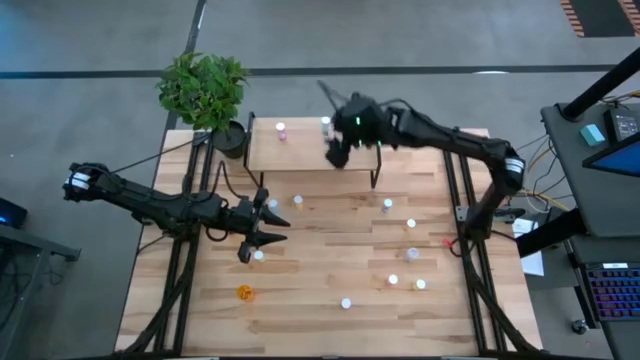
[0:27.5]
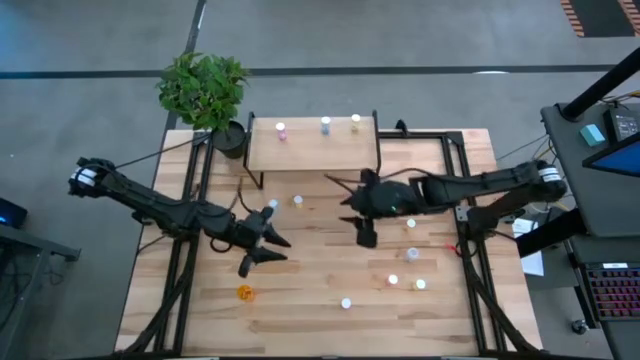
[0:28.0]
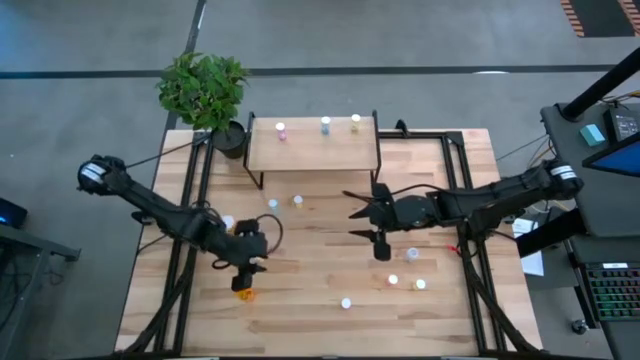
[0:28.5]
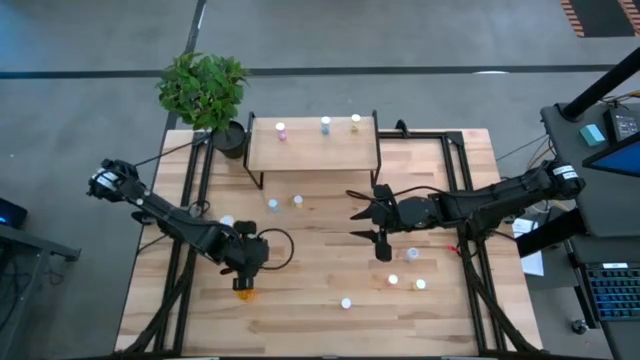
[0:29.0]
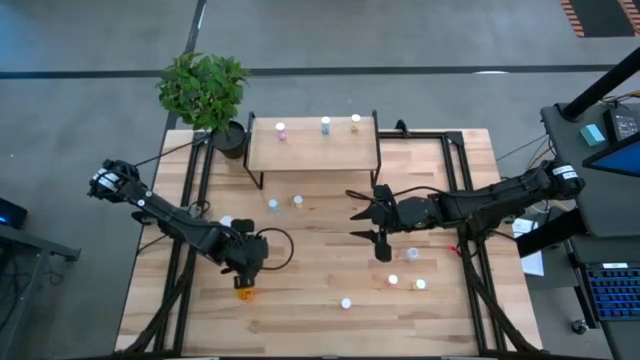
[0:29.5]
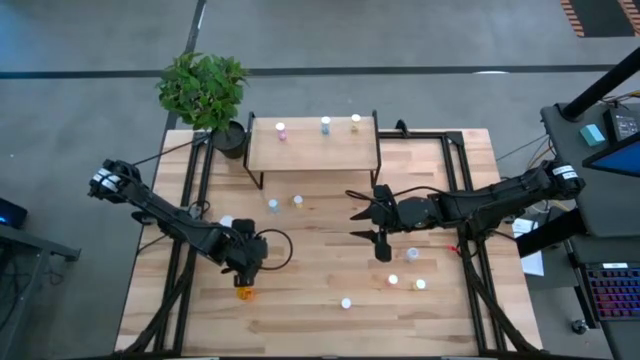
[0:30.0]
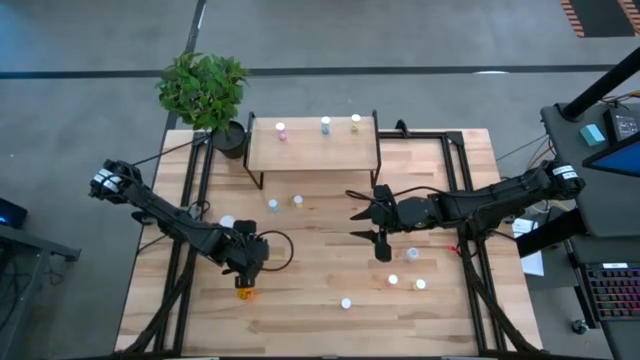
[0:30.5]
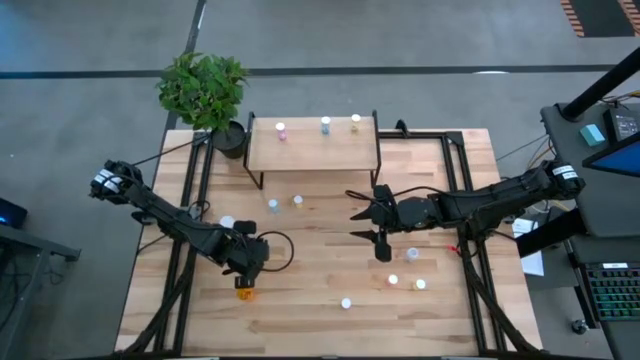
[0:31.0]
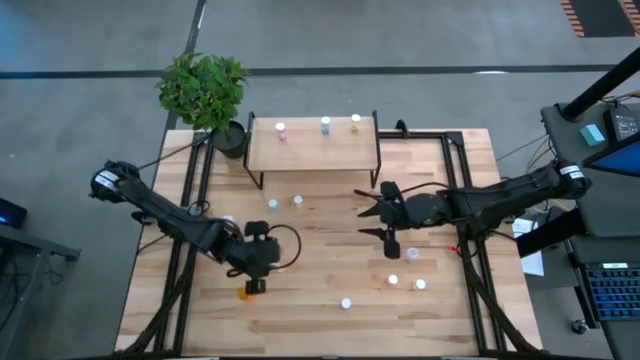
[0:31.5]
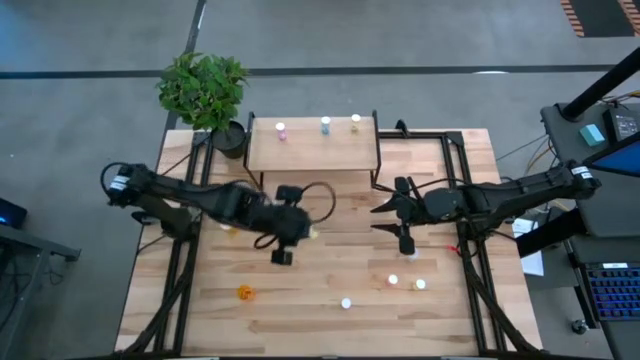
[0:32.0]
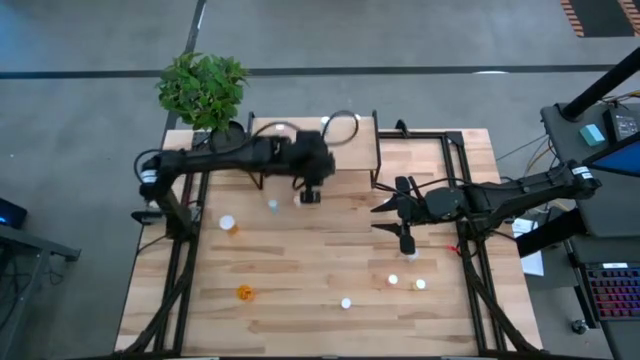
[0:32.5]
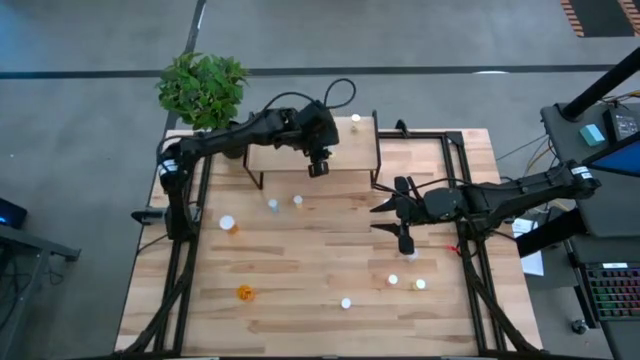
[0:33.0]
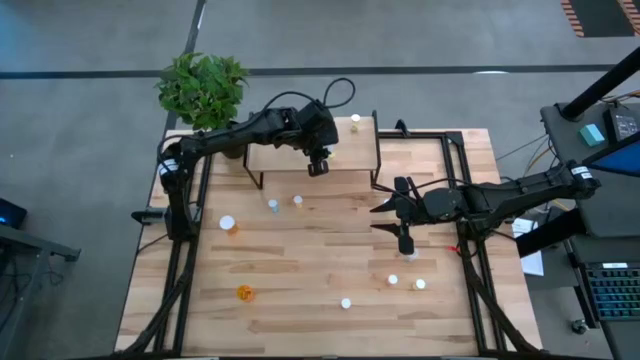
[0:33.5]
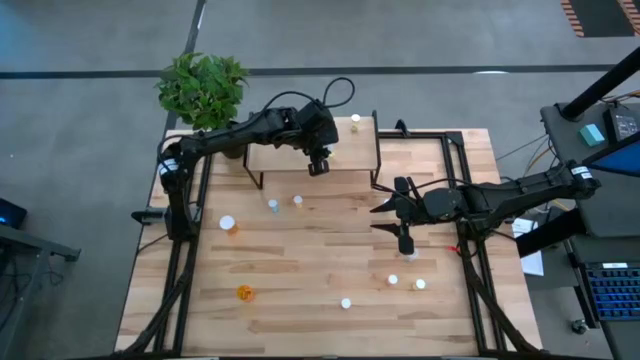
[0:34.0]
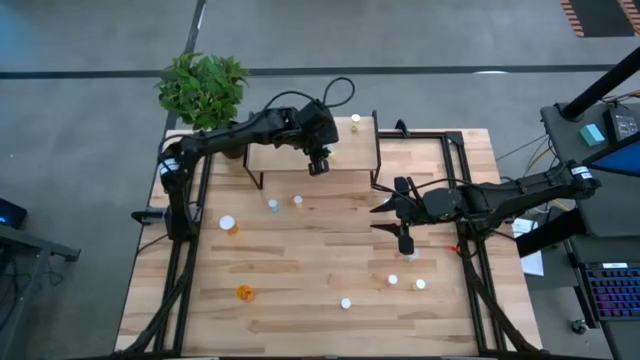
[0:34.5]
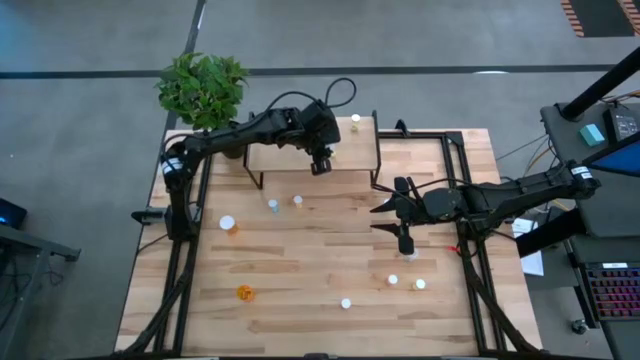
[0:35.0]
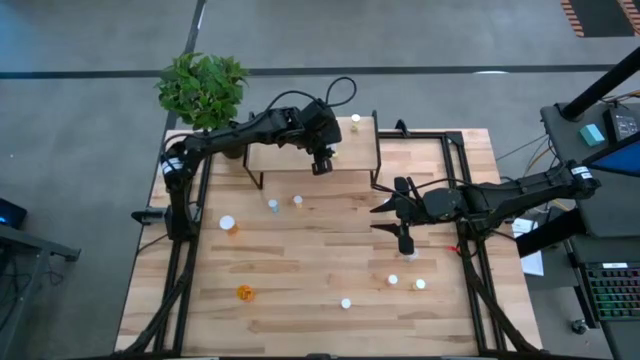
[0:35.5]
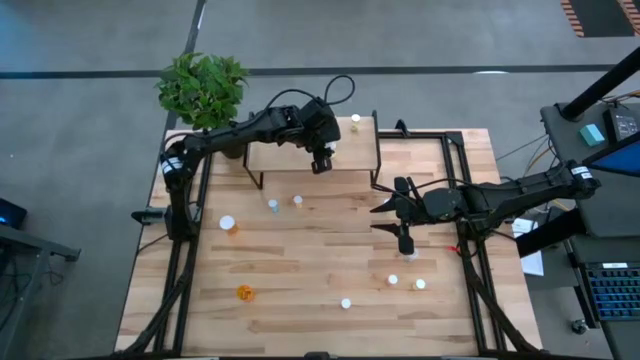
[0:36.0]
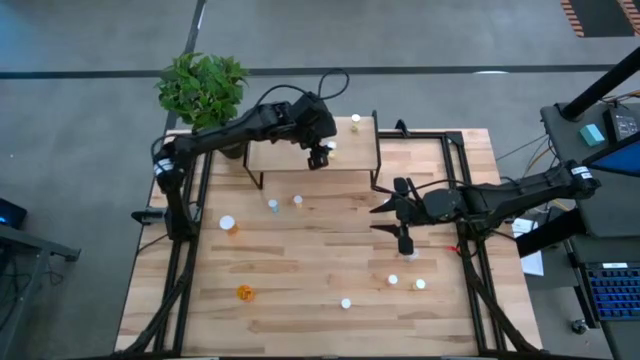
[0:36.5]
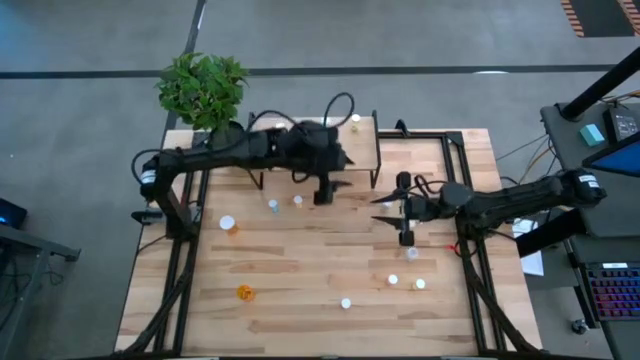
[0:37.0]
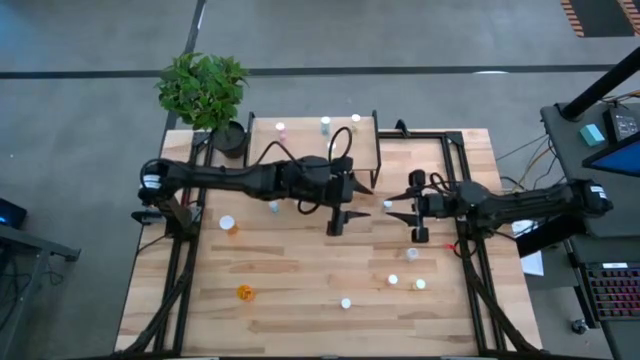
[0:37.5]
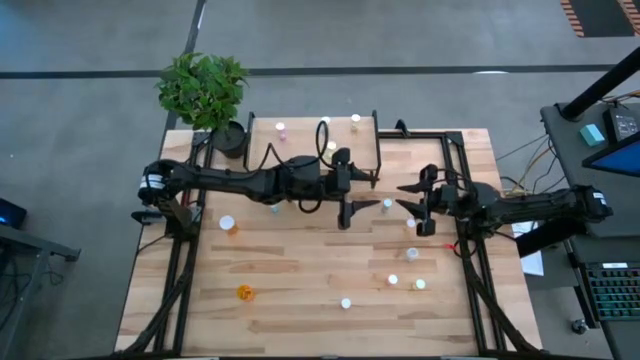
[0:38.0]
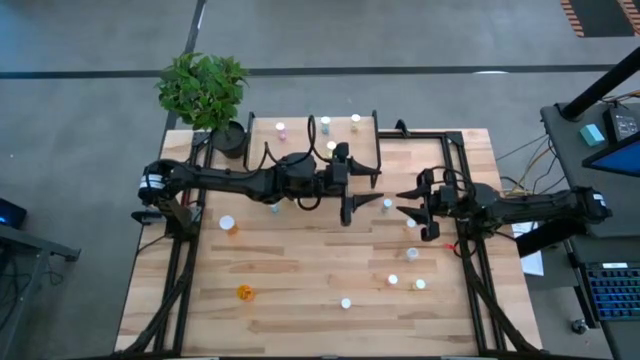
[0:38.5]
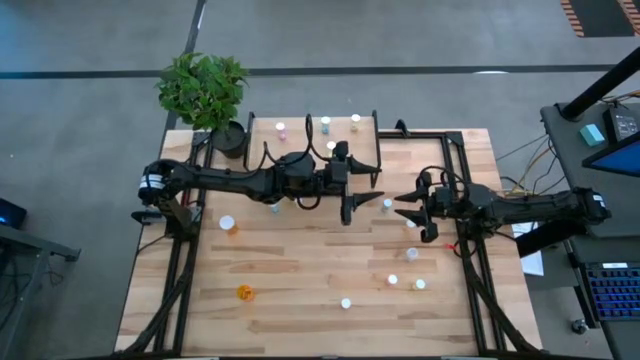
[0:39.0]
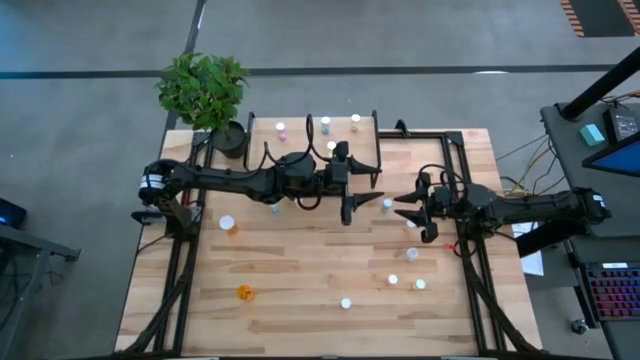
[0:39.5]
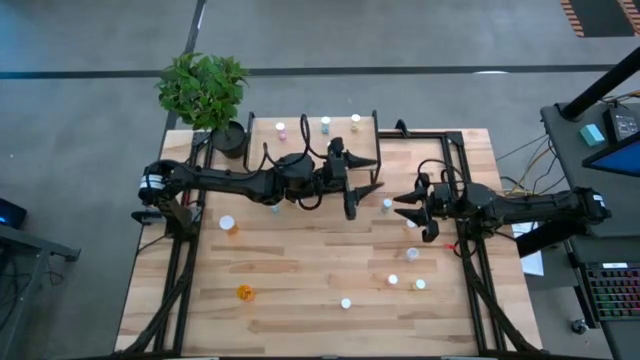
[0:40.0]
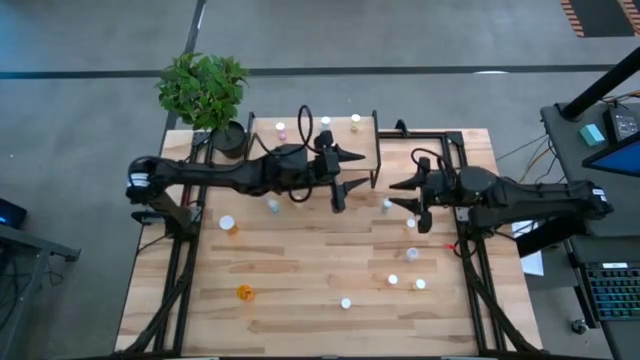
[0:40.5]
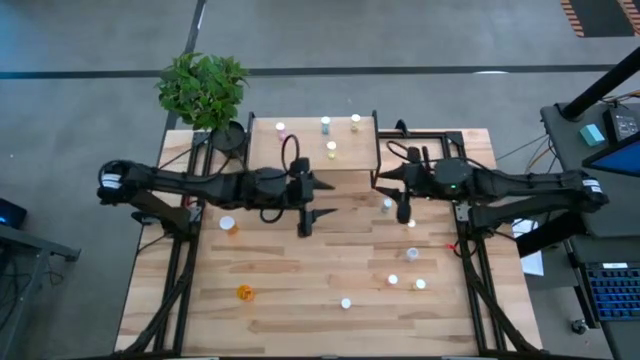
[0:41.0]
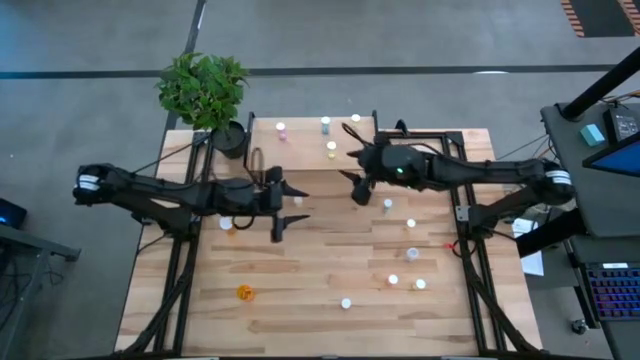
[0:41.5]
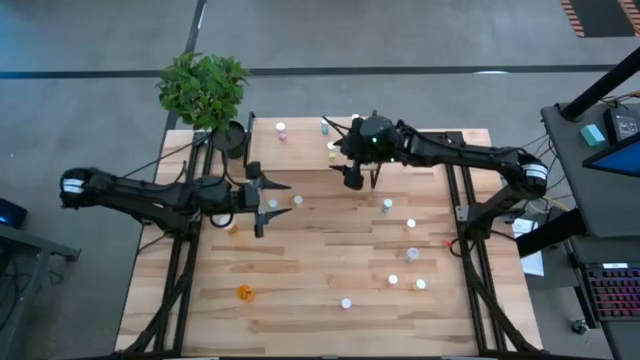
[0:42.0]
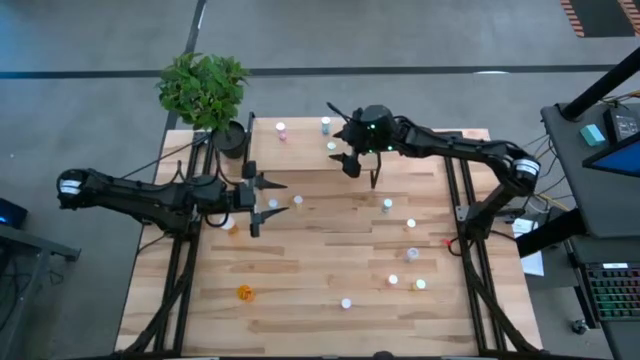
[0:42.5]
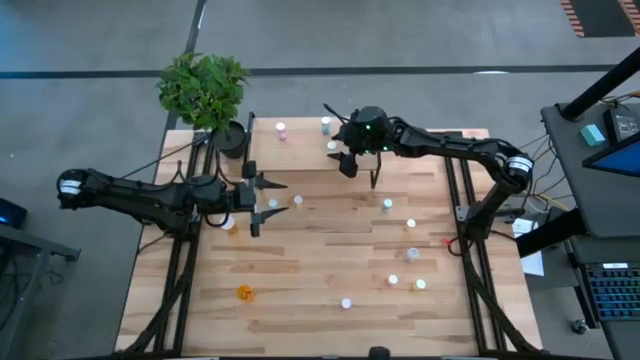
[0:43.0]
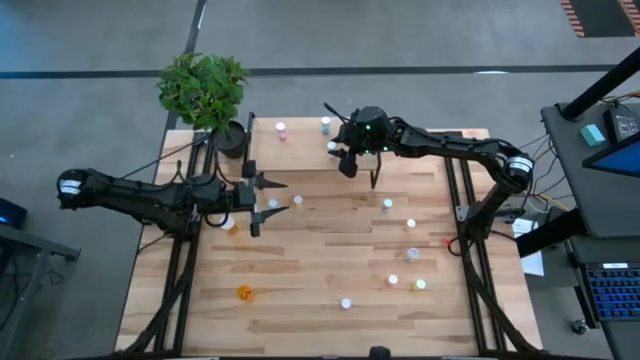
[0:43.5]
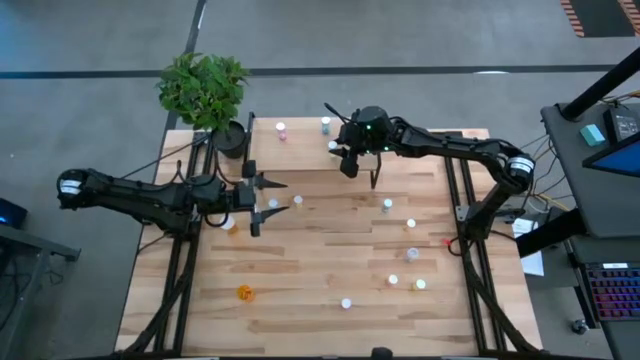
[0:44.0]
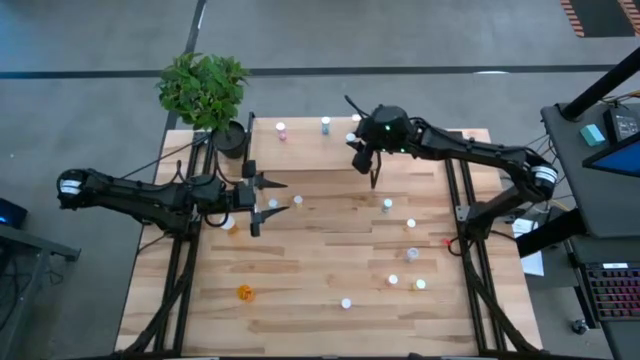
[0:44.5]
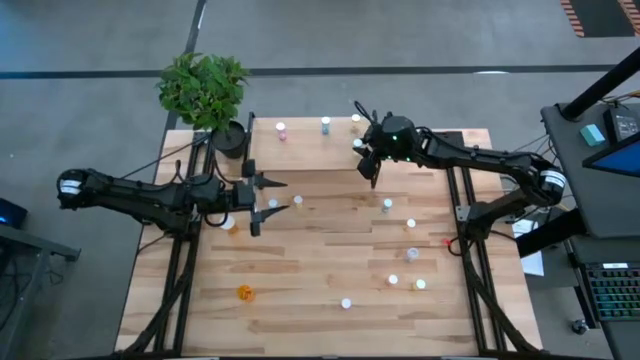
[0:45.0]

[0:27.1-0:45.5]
Task: Pick and place medicine bottles onto shelf by color
Put the yellow pill bottle on the shelf

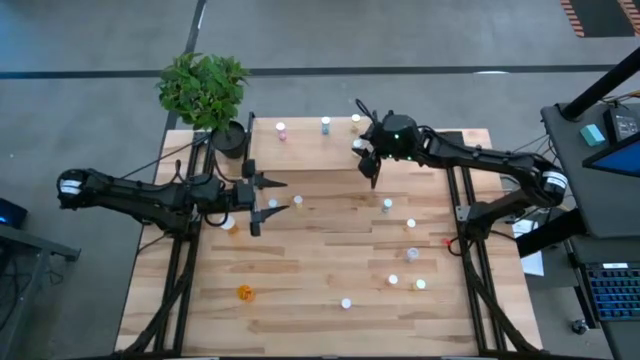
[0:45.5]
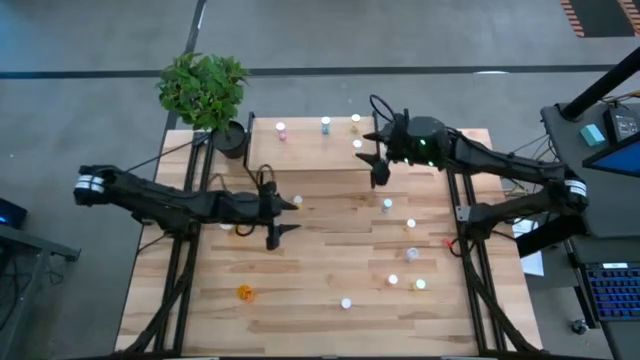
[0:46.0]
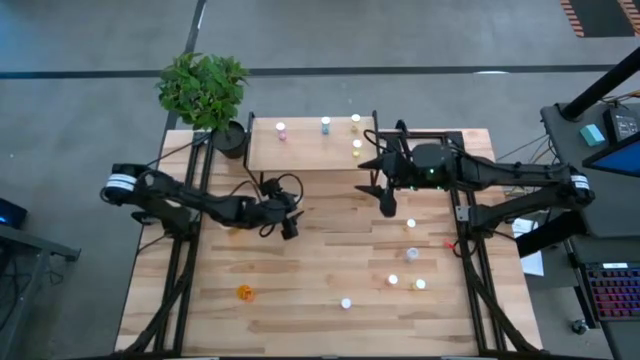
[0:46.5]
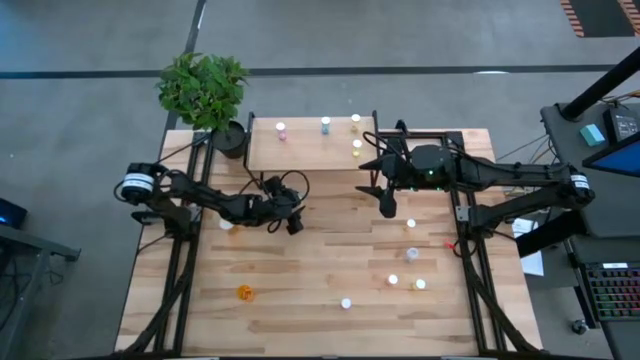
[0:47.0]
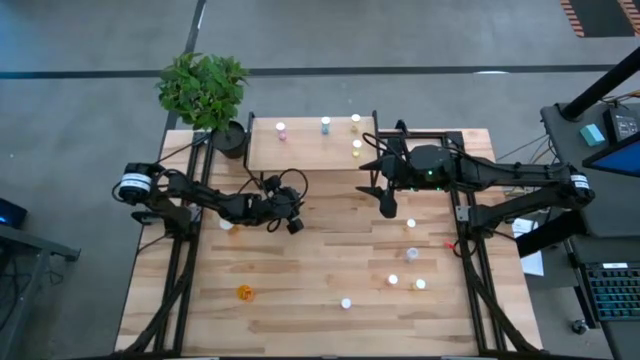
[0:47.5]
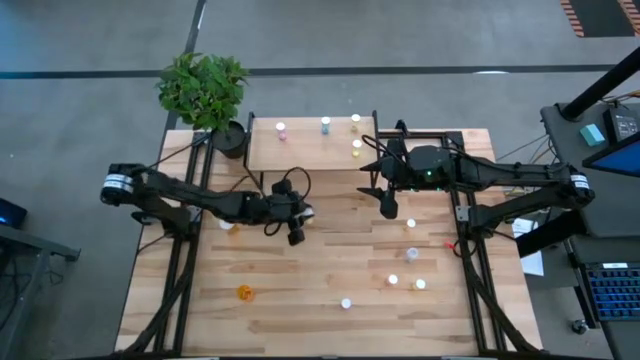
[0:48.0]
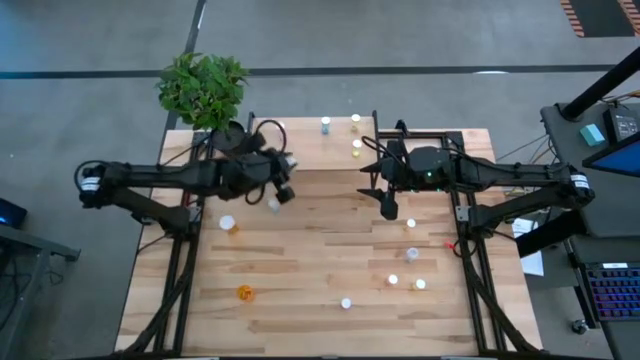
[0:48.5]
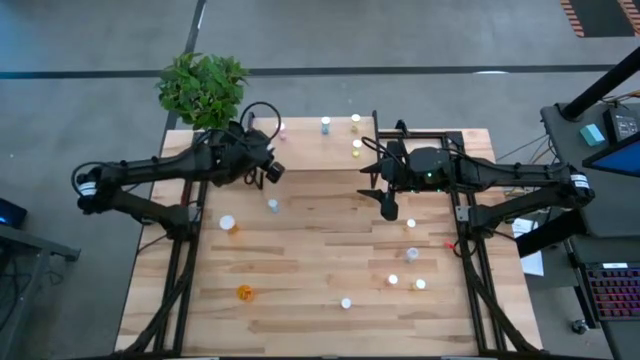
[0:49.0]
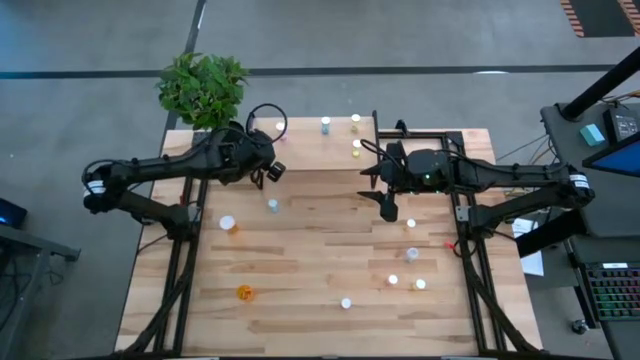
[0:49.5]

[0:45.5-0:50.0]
Put the yellow pill bottle on the shelf
